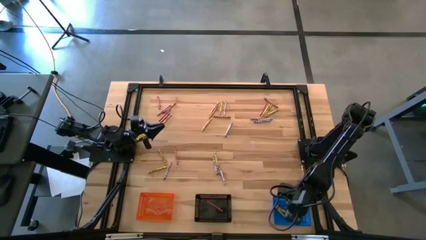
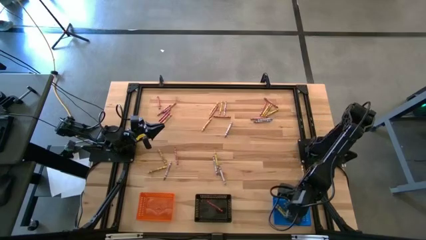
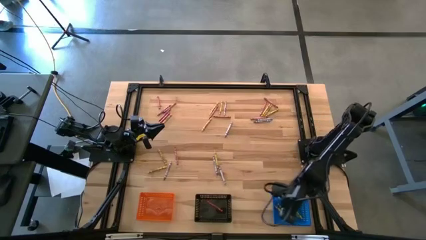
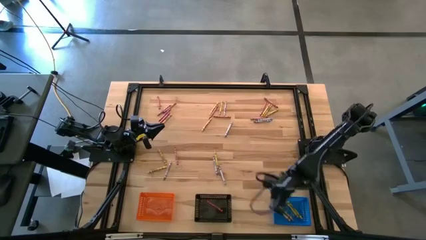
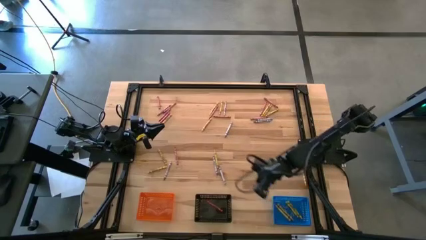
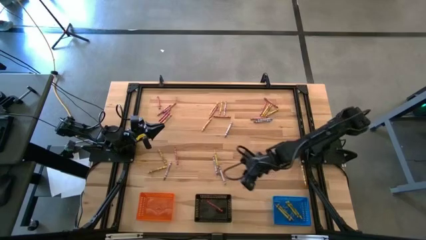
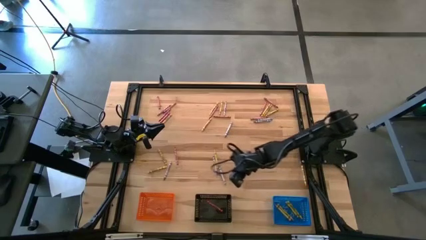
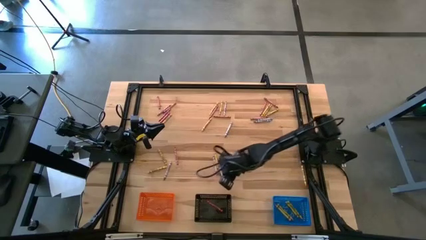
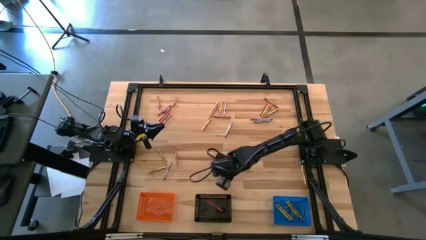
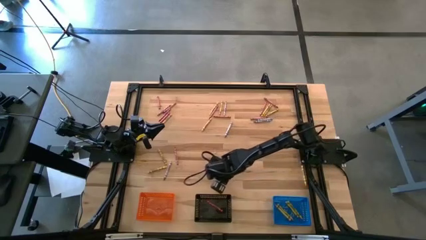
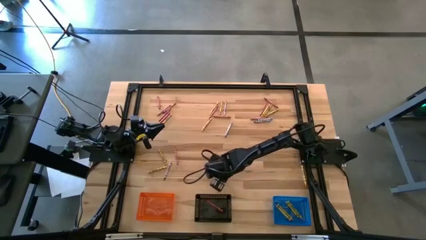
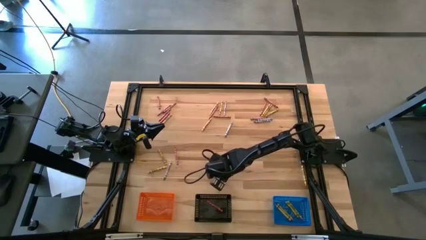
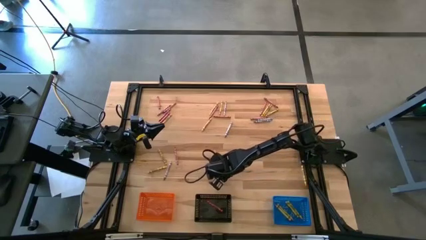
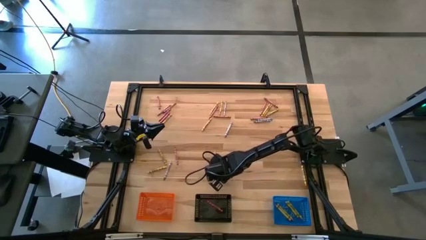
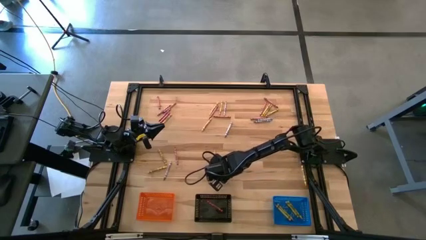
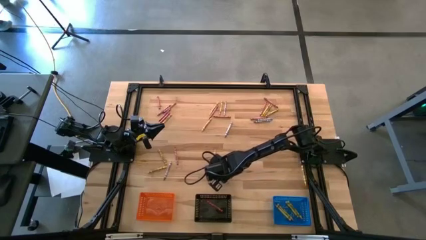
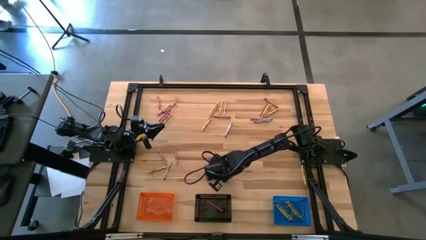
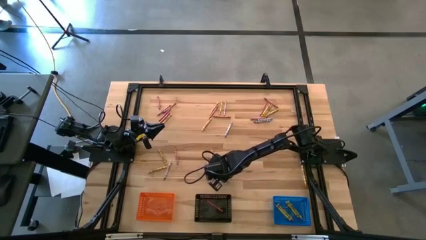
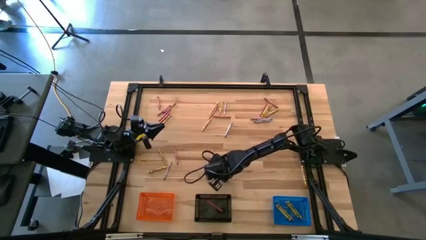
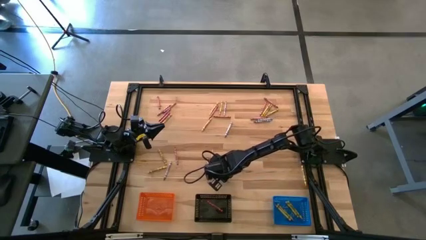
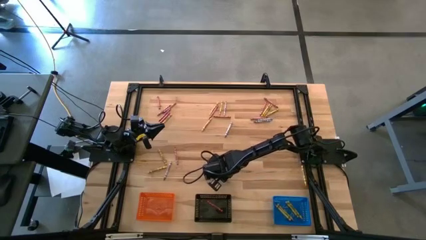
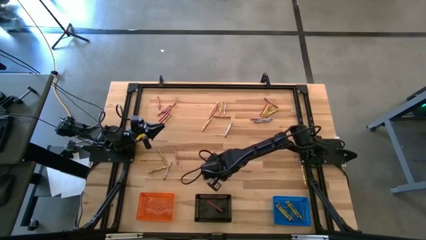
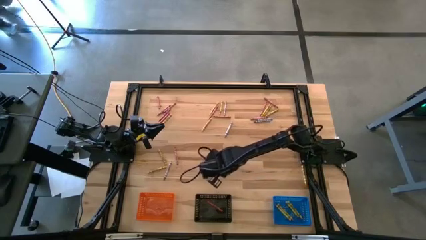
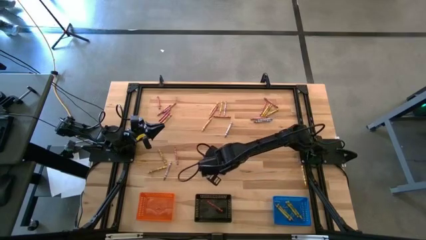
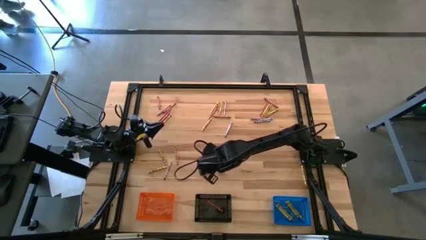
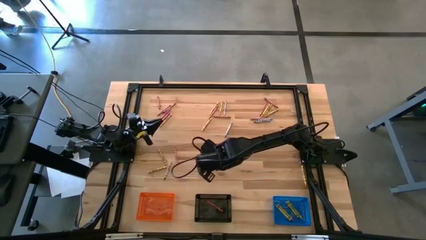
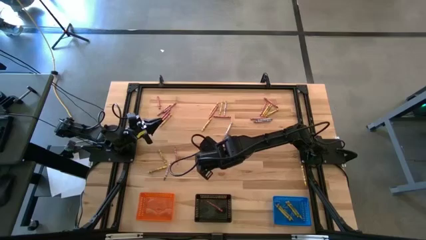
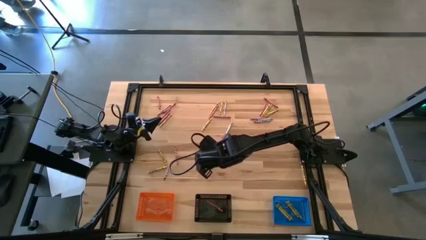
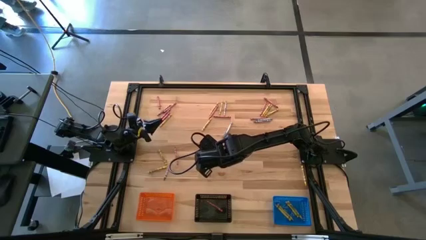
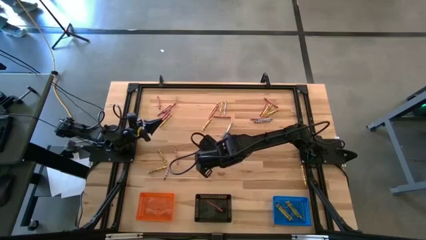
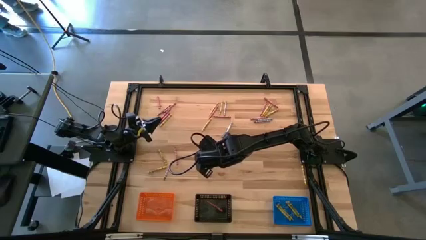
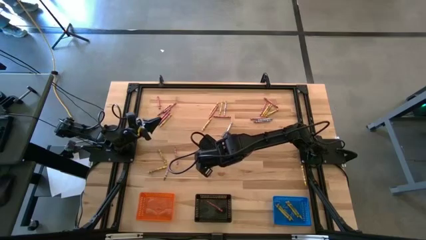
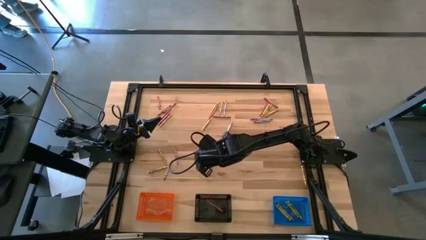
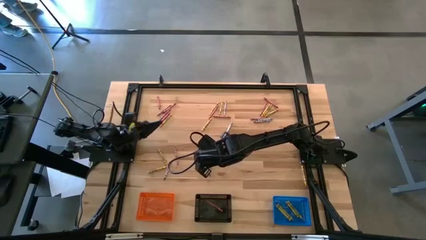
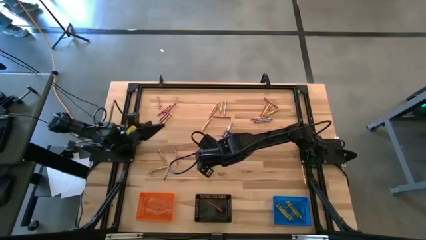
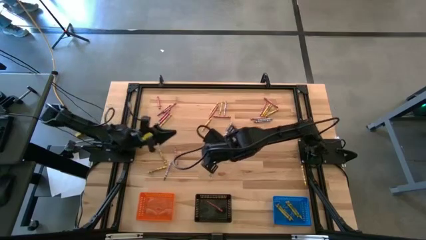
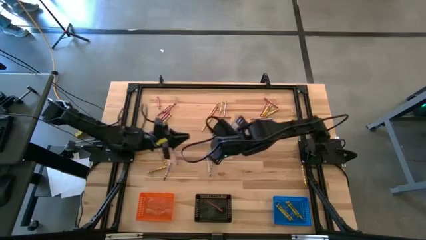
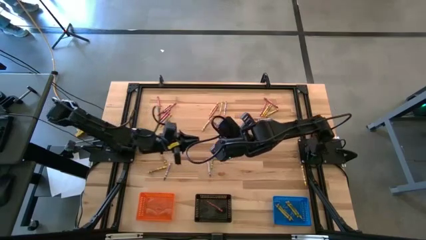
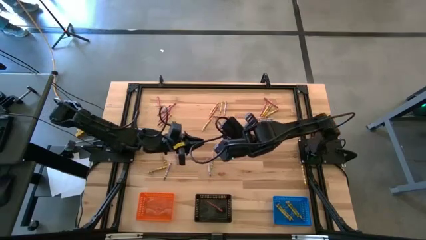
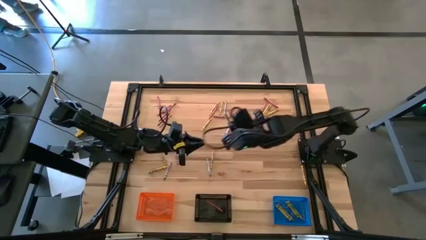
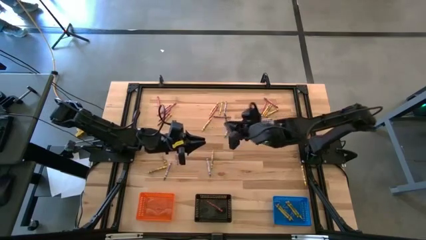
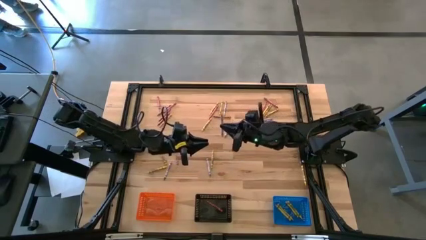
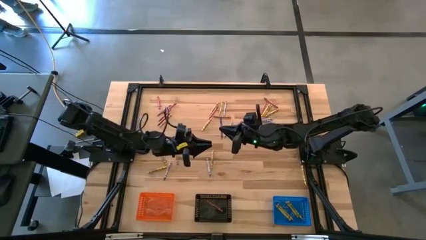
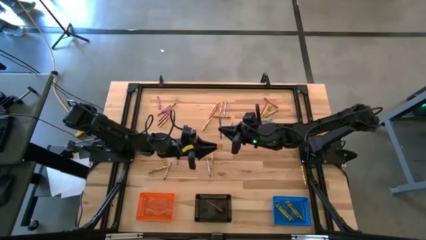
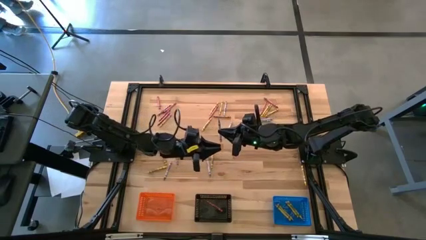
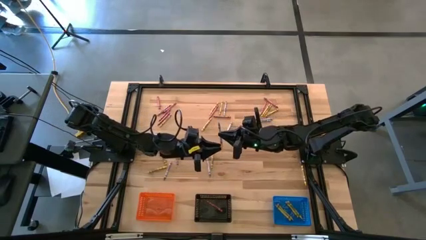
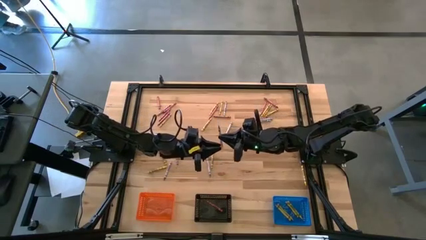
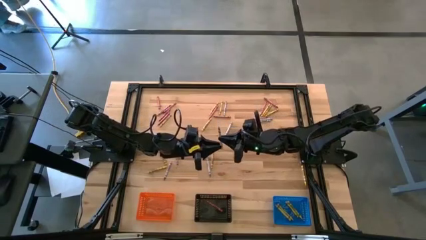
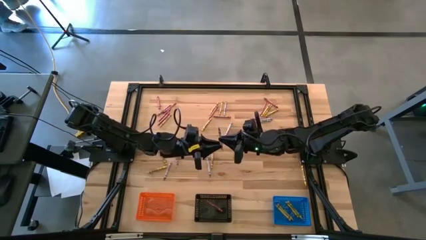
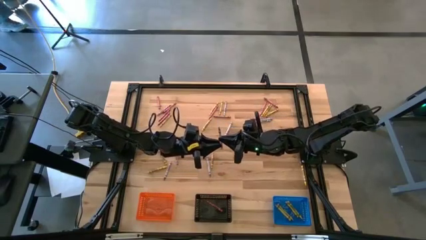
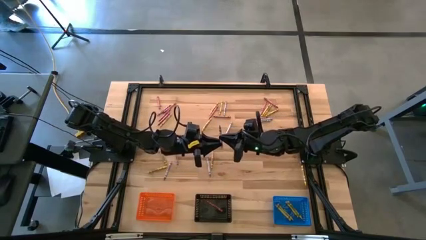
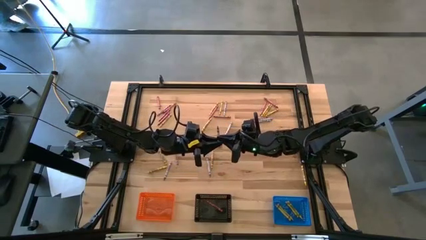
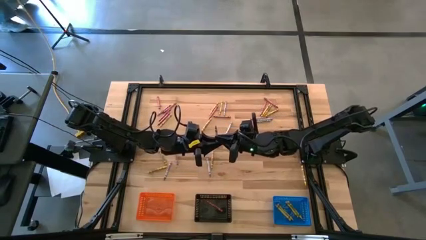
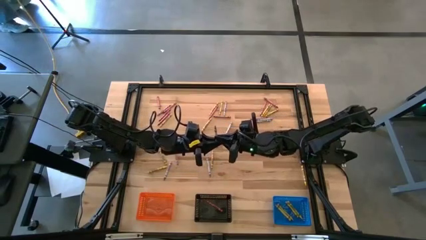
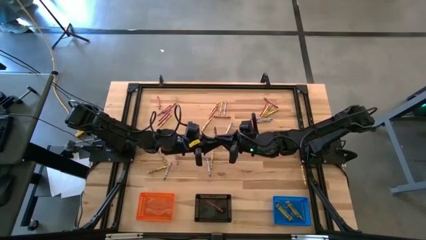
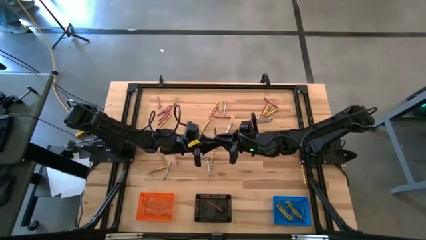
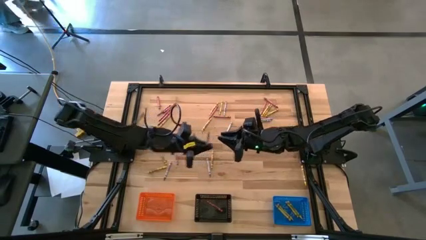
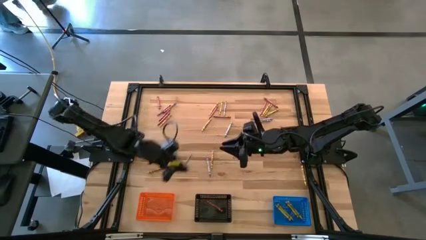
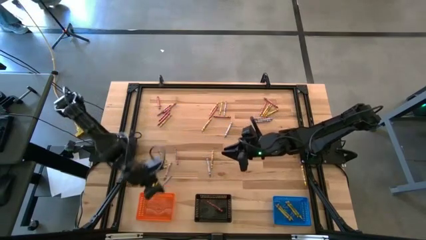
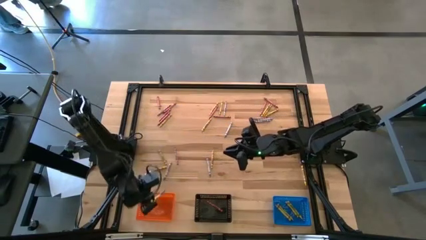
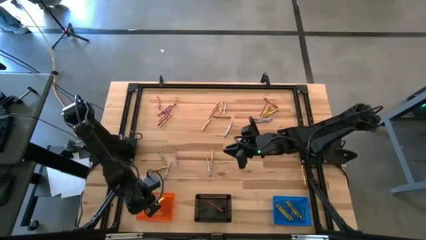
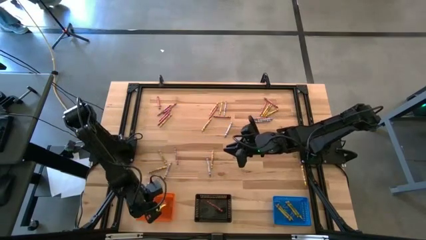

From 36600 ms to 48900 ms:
Task: Sort crayons
Put the gray crayon into the orange bin

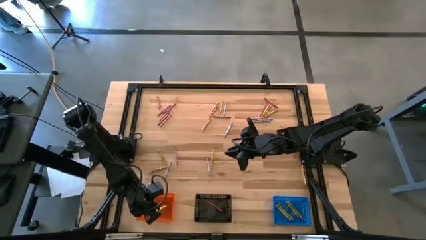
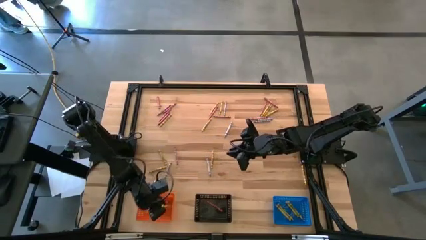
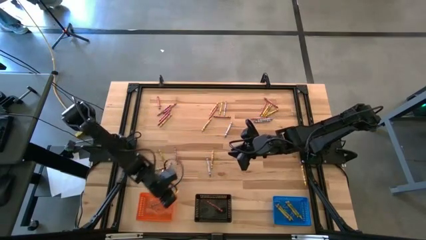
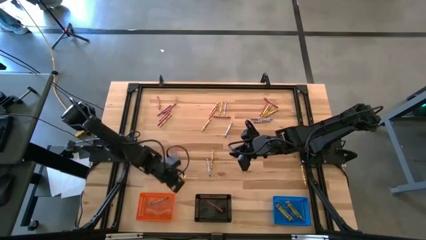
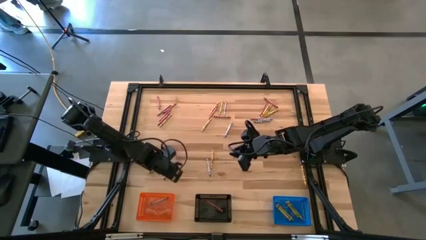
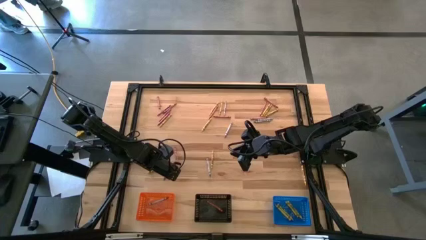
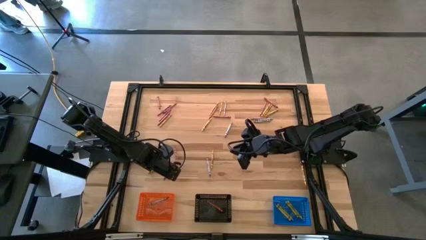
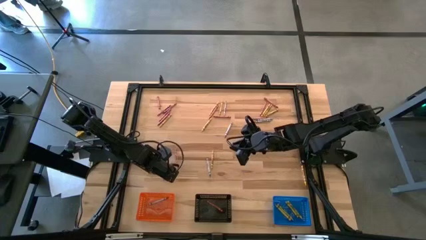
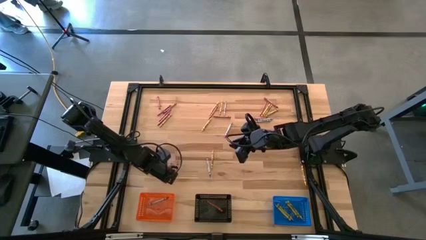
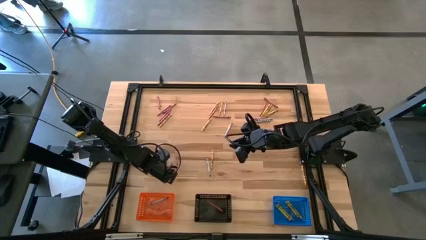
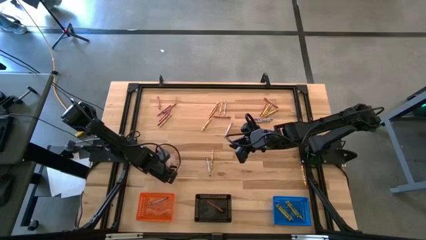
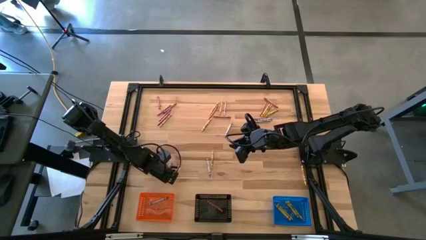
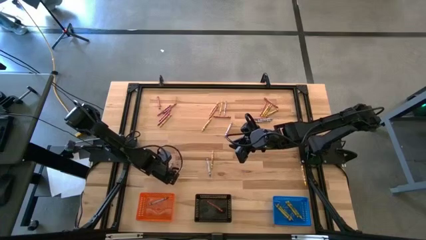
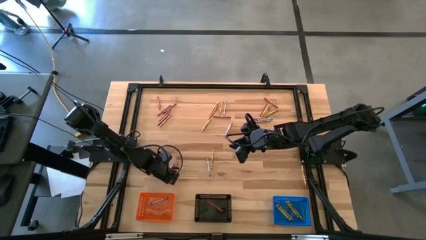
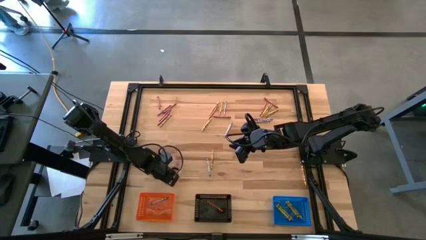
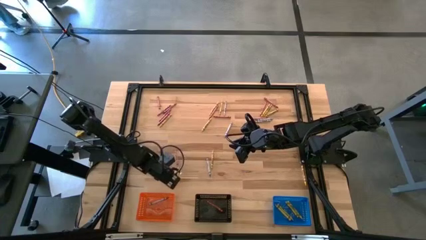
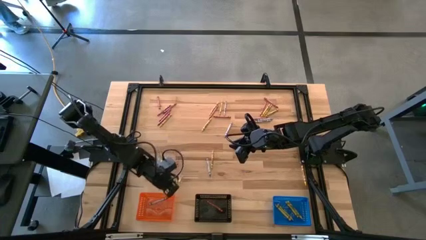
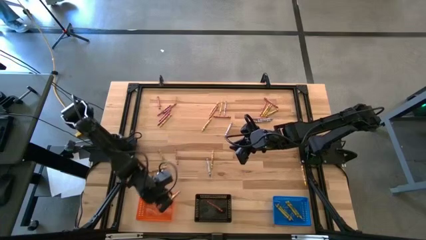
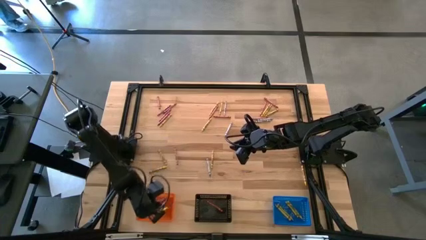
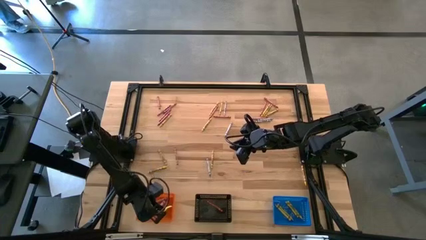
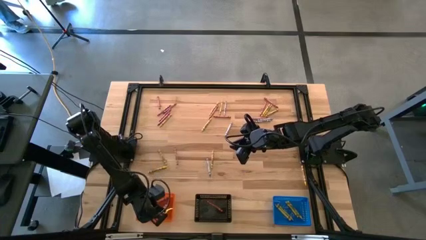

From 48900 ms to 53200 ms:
Put the gray crayon into the orange bin
